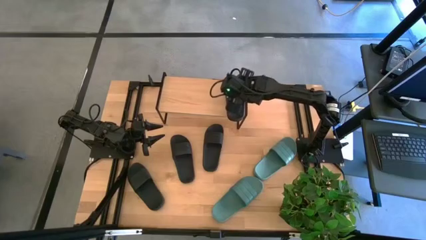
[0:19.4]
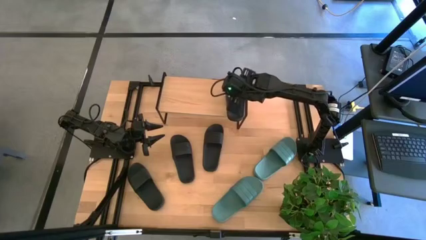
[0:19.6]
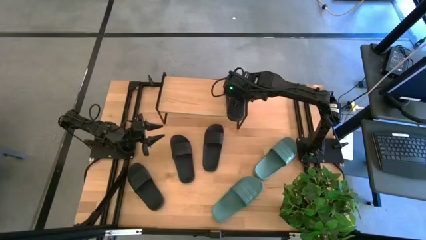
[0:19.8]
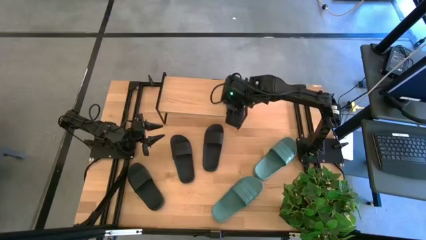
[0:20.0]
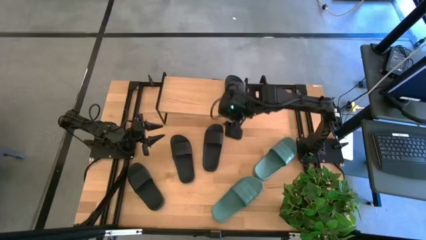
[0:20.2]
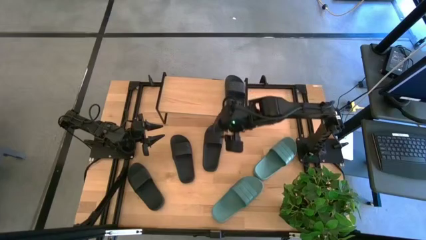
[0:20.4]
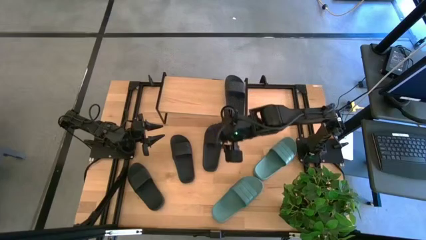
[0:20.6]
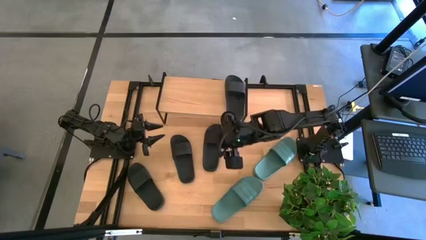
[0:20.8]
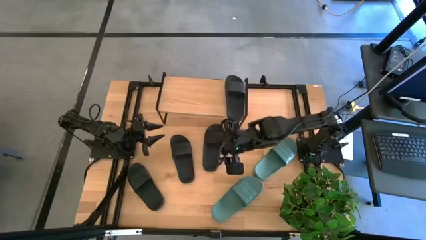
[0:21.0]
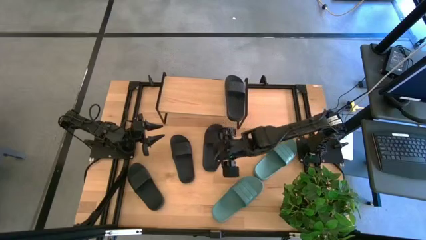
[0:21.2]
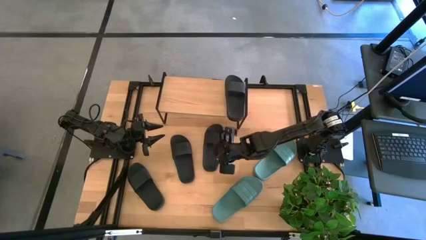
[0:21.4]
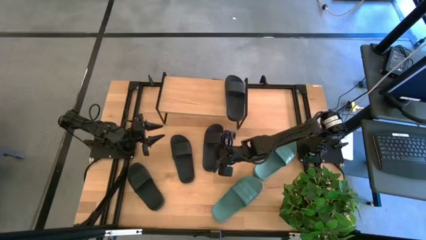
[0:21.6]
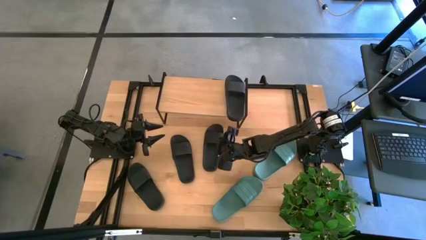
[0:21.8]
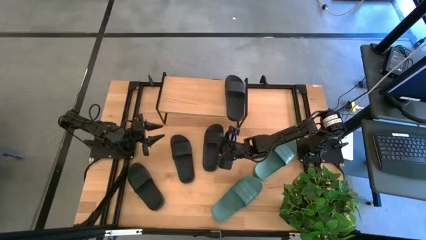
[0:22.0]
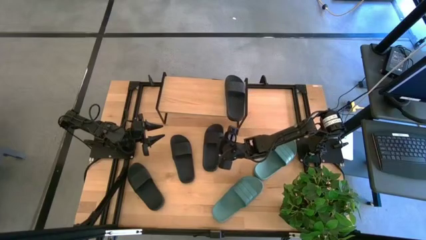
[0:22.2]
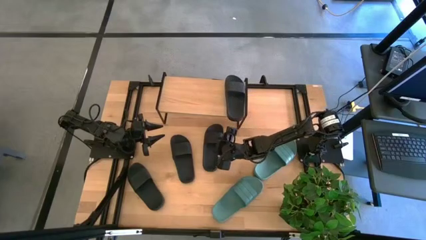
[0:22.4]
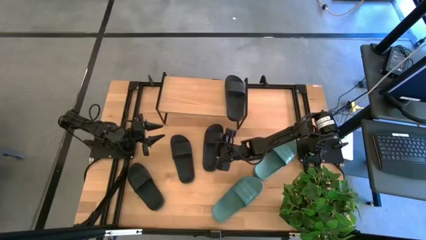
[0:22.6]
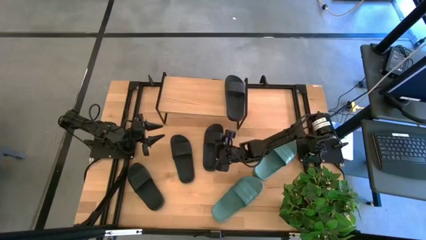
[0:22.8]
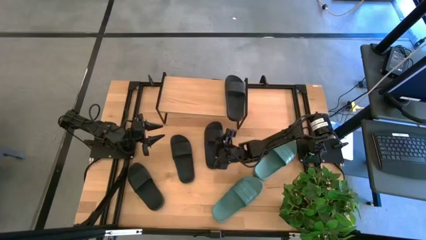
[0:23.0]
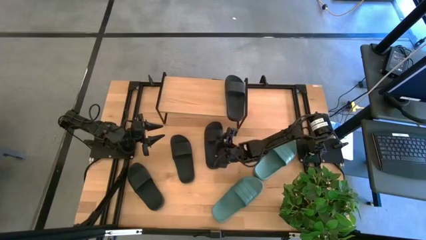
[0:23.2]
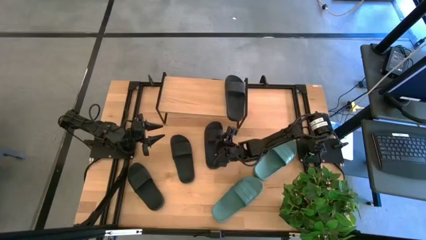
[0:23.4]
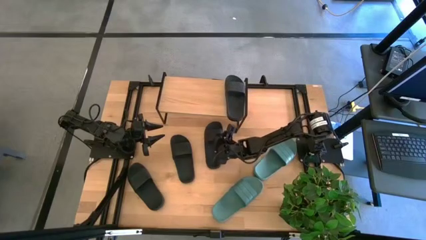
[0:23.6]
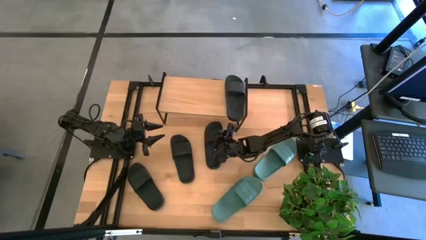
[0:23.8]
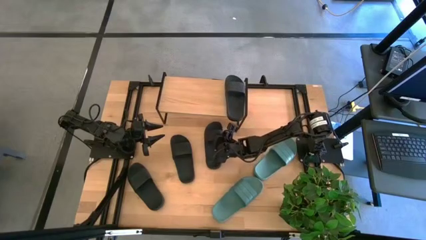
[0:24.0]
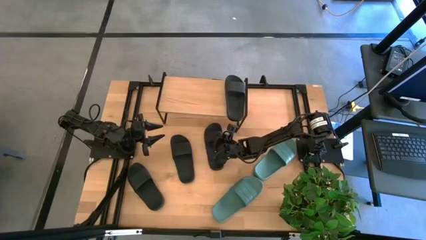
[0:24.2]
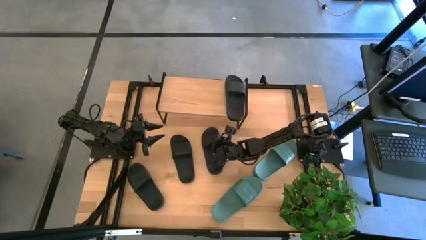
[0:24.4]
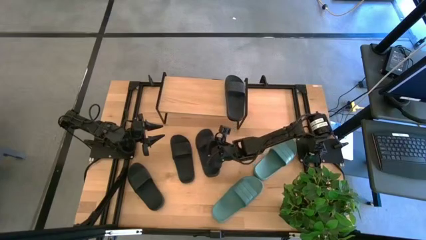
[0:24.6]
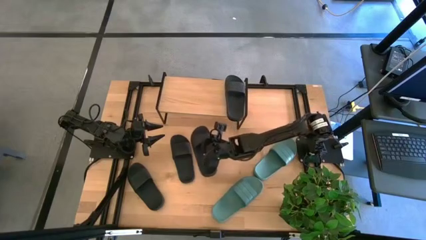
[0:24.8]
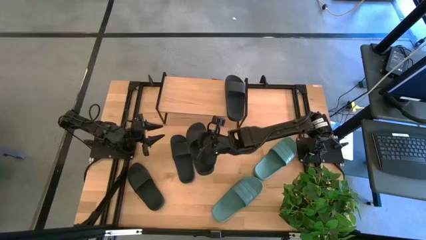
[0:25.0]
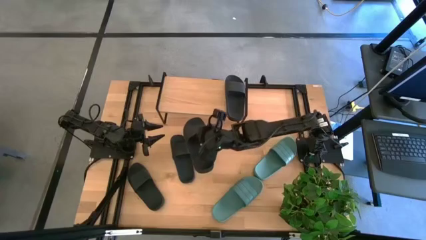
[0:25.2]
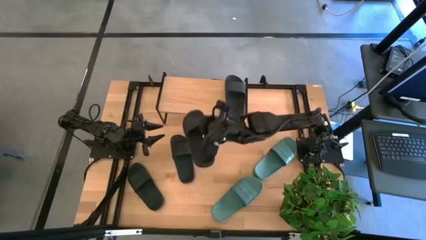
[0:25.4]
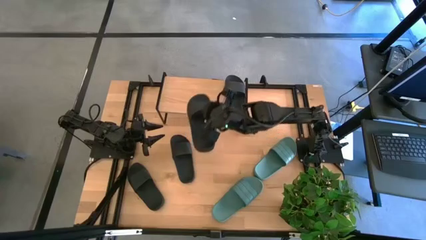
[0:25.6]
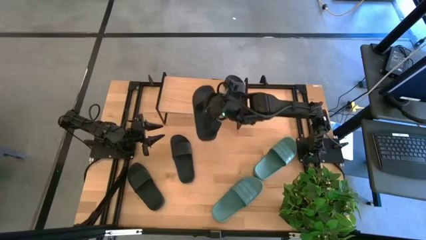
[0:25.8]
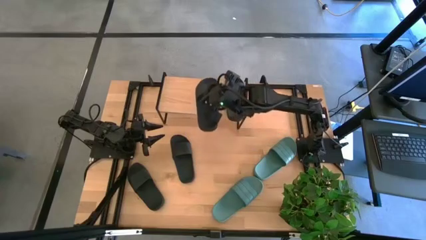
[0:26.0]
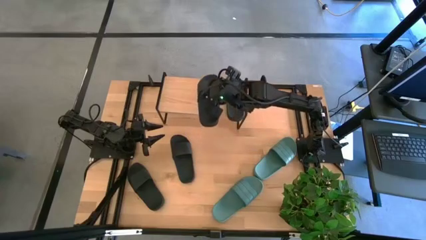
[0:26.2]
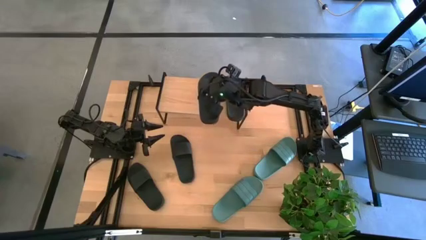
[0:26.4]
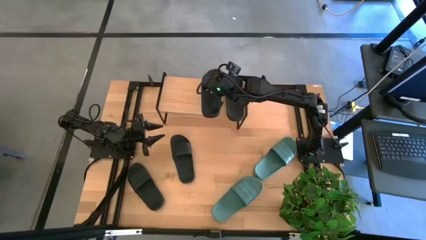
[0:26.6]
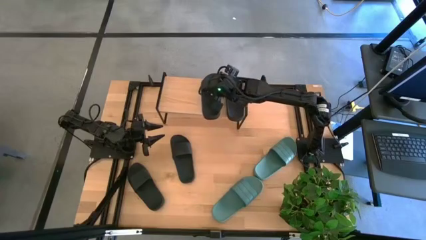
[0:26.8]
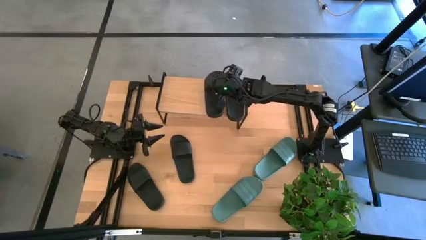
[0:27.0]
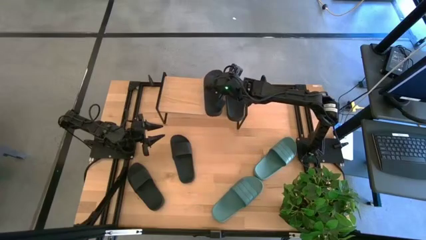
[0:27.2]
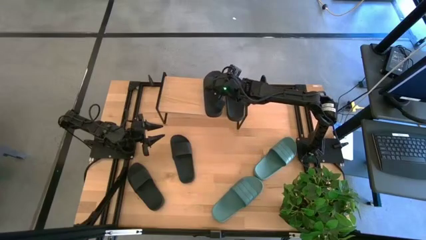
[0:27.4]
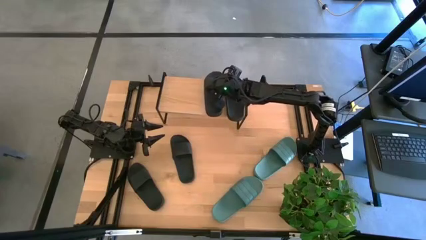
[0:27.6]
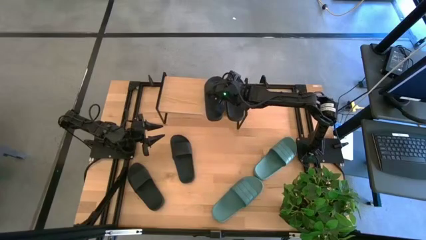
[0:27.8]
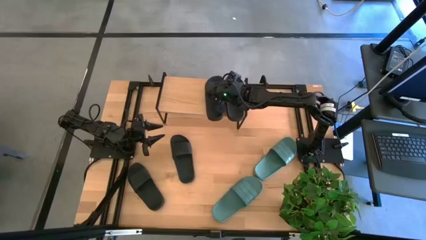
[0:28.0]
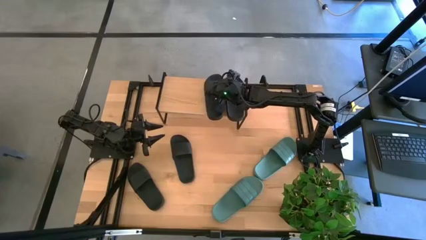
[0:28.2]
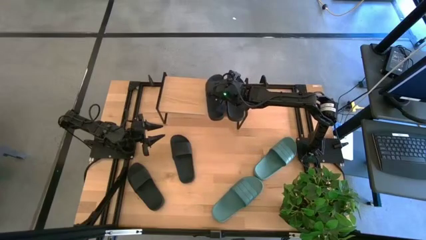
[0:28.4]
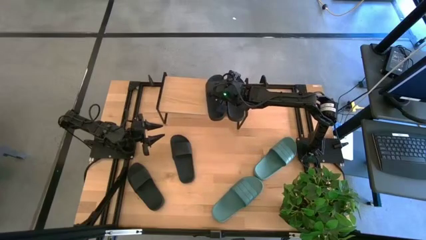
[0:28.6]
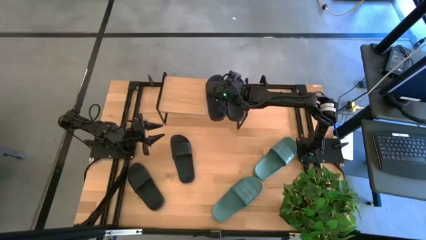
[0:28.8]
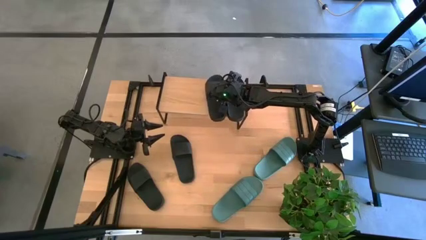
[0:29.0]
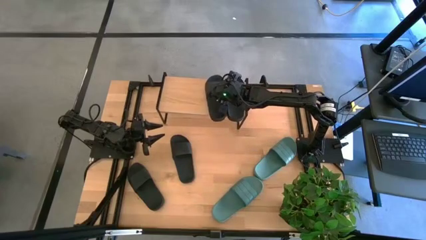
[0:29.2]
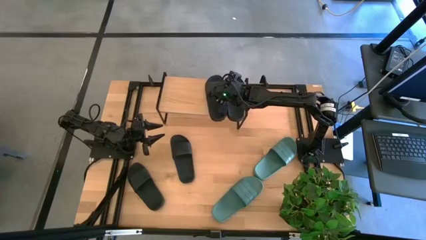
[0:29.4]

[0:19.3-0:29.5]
Task: Pick and place slides into the shelf
Put the black slide on the shelf
